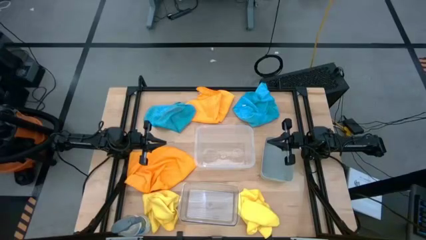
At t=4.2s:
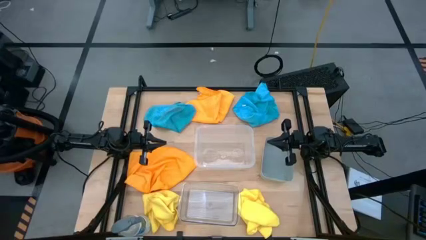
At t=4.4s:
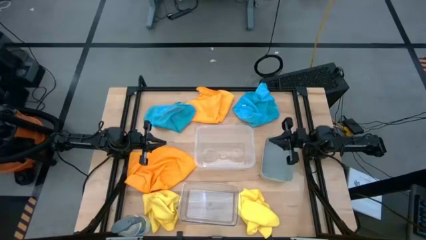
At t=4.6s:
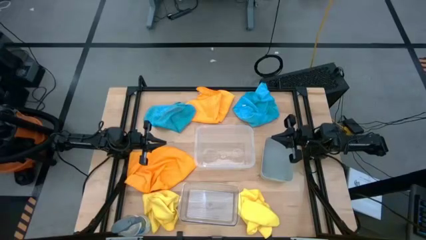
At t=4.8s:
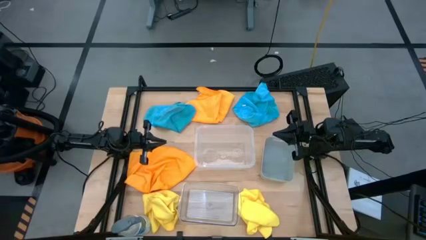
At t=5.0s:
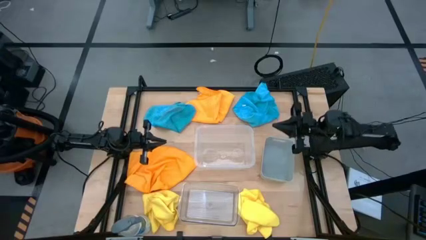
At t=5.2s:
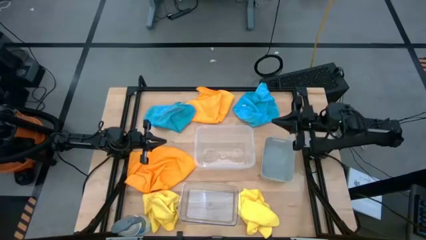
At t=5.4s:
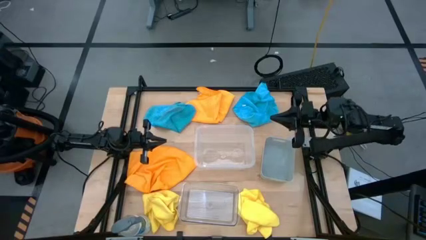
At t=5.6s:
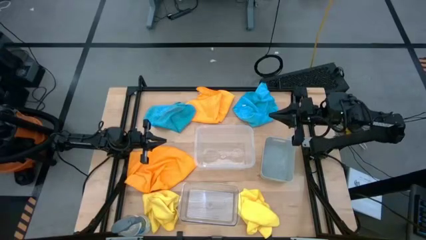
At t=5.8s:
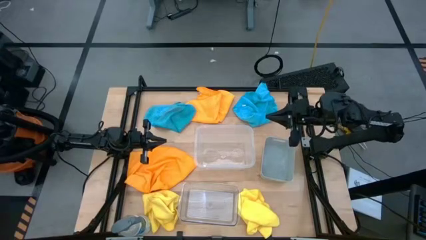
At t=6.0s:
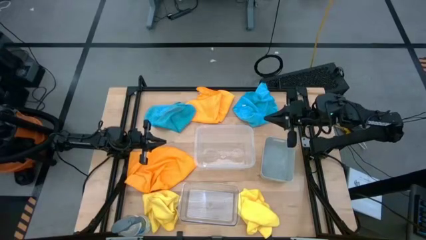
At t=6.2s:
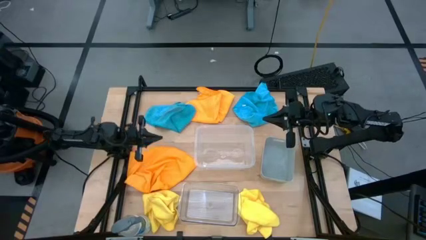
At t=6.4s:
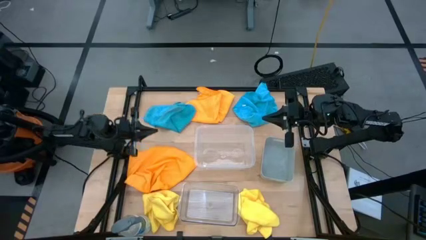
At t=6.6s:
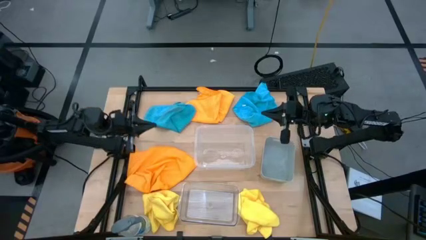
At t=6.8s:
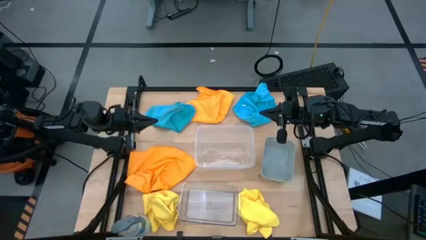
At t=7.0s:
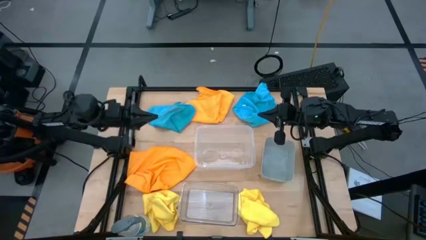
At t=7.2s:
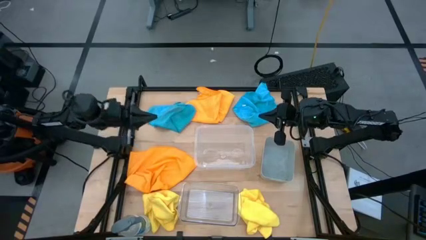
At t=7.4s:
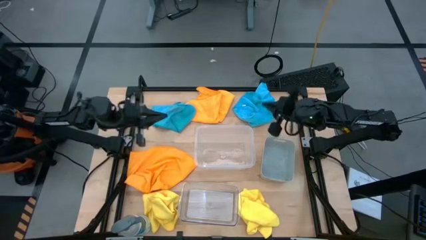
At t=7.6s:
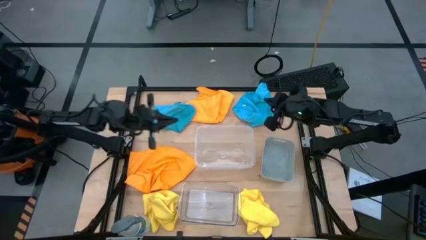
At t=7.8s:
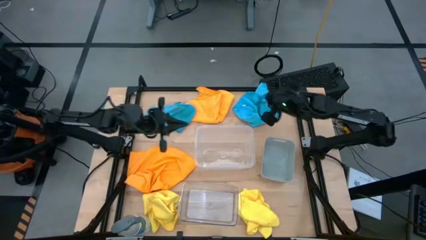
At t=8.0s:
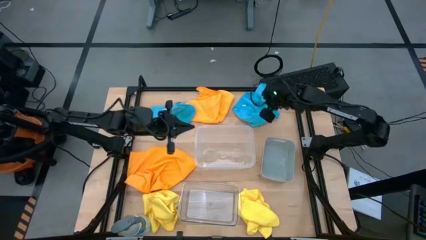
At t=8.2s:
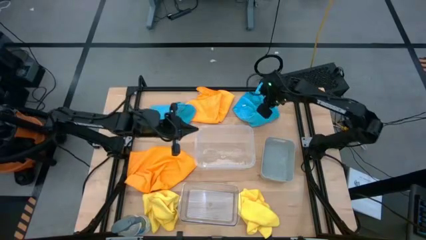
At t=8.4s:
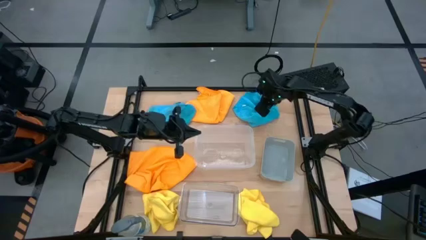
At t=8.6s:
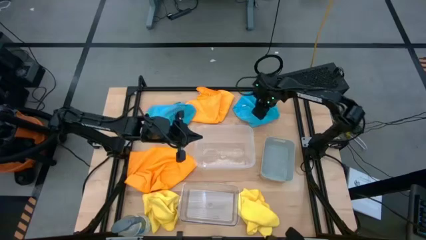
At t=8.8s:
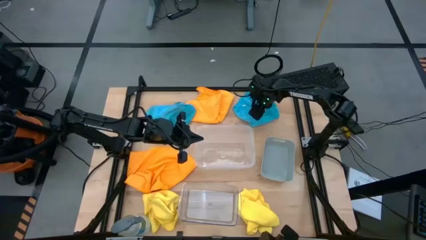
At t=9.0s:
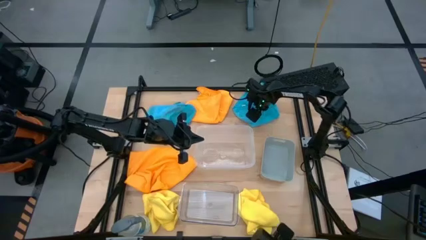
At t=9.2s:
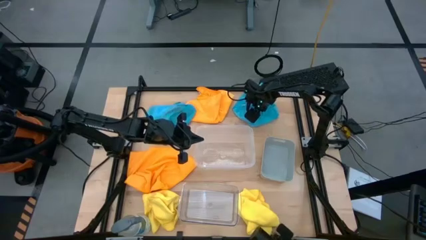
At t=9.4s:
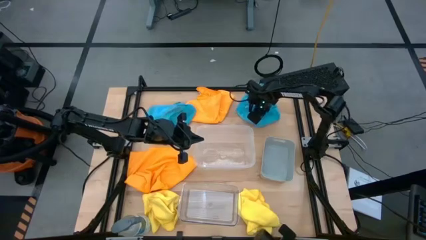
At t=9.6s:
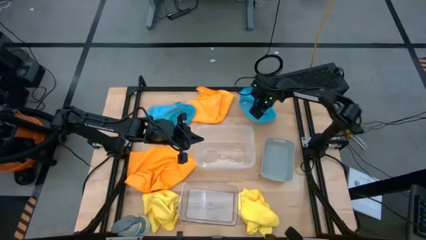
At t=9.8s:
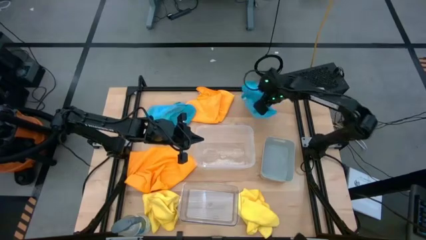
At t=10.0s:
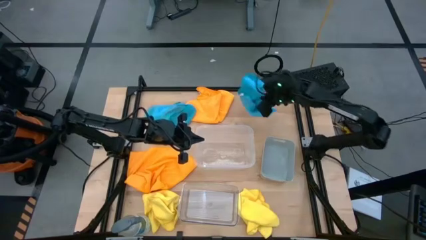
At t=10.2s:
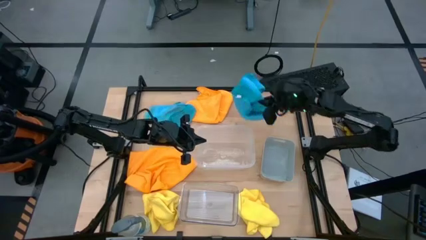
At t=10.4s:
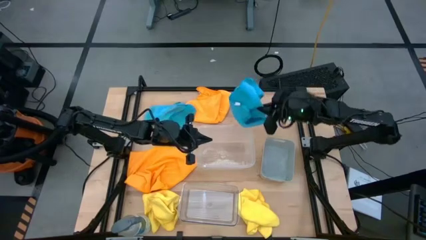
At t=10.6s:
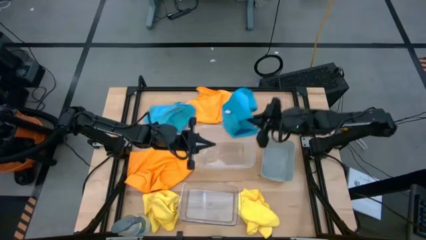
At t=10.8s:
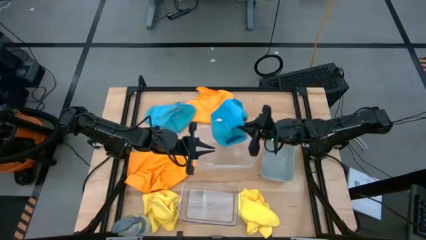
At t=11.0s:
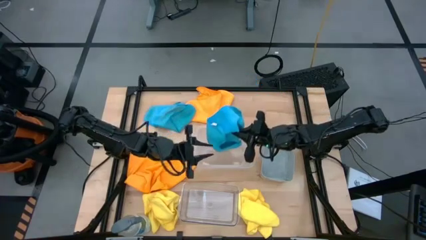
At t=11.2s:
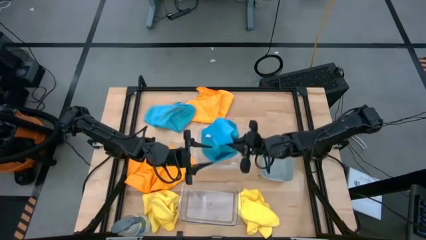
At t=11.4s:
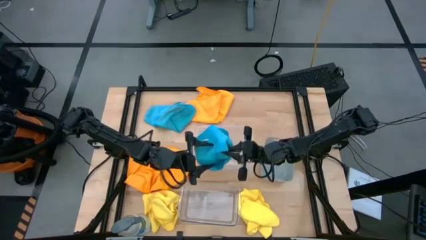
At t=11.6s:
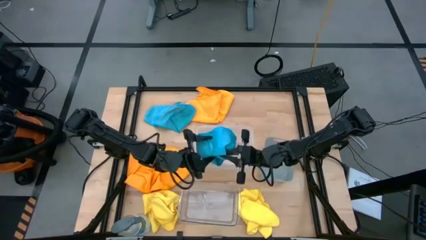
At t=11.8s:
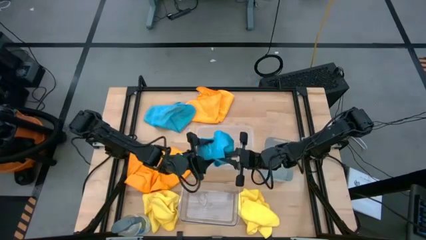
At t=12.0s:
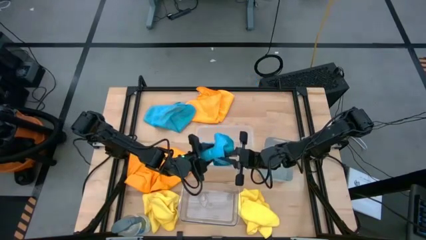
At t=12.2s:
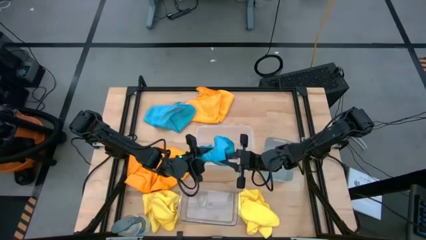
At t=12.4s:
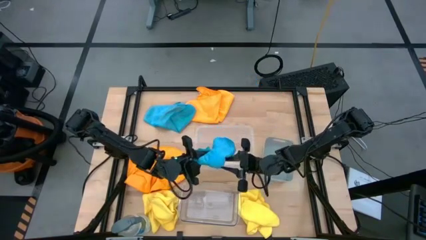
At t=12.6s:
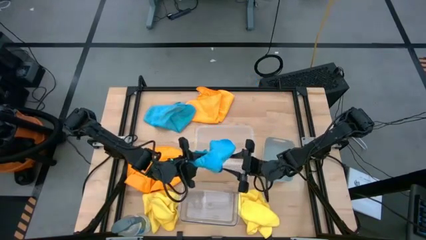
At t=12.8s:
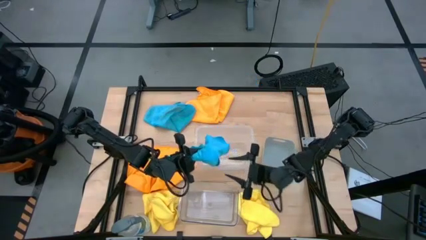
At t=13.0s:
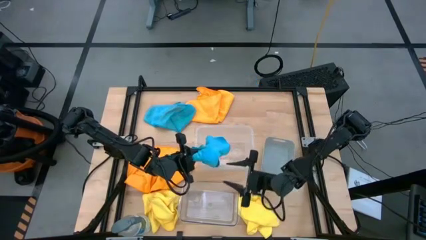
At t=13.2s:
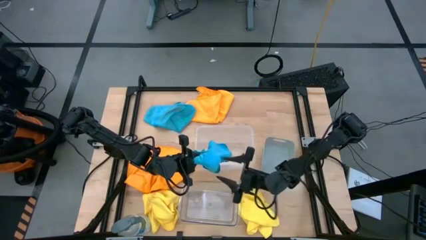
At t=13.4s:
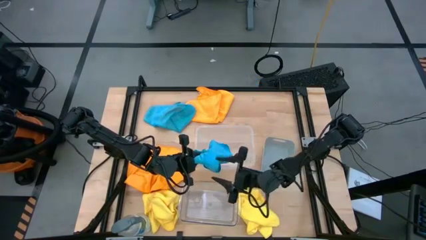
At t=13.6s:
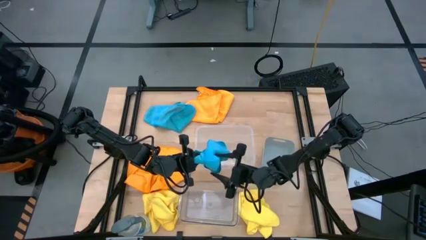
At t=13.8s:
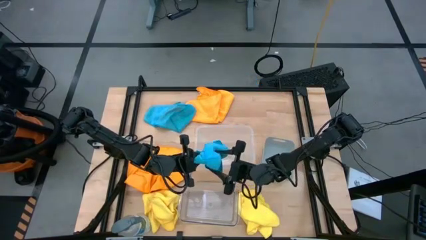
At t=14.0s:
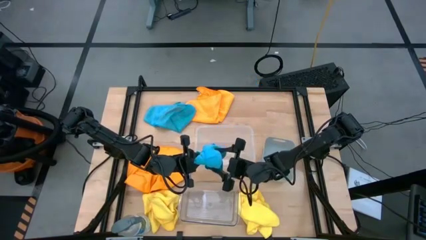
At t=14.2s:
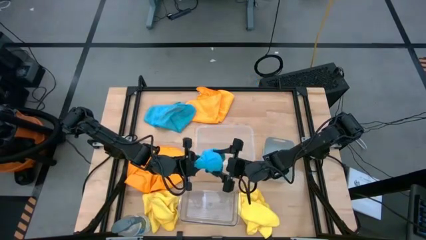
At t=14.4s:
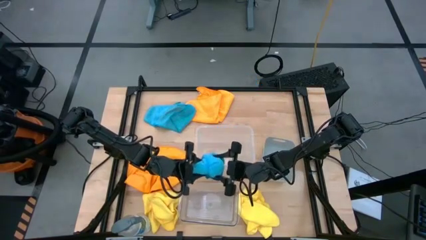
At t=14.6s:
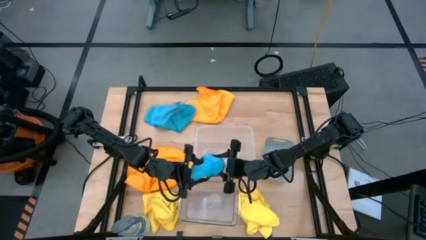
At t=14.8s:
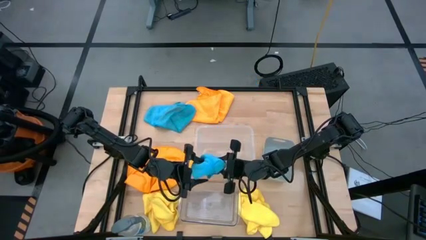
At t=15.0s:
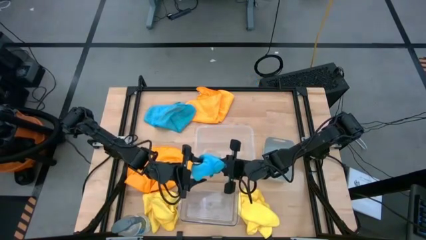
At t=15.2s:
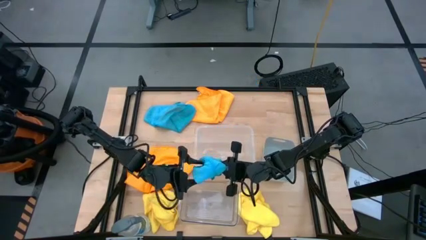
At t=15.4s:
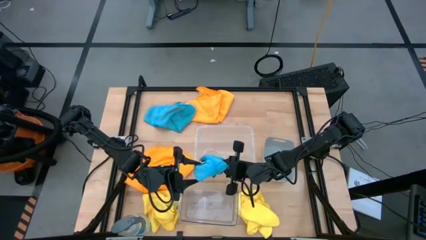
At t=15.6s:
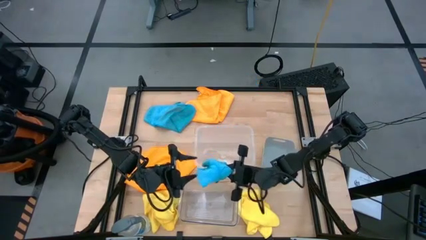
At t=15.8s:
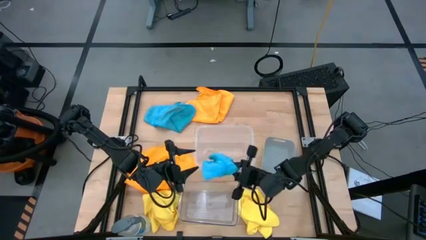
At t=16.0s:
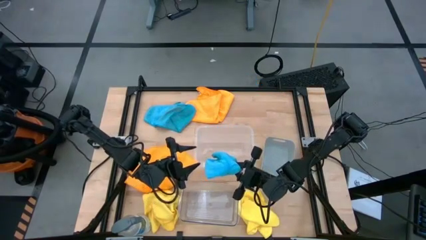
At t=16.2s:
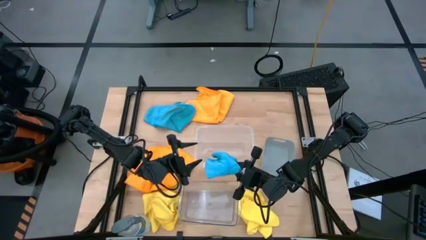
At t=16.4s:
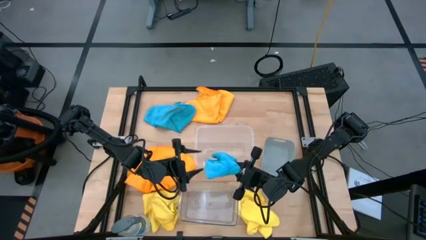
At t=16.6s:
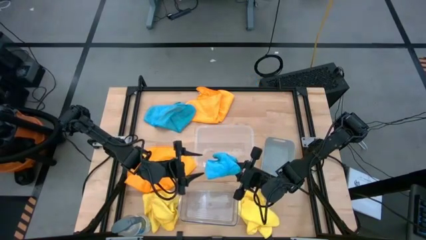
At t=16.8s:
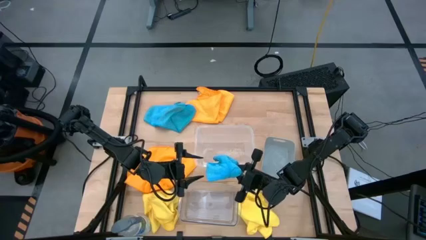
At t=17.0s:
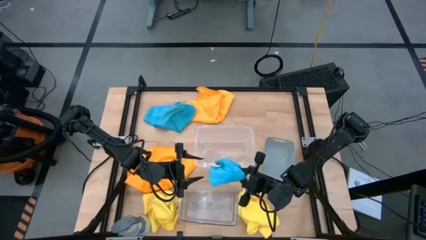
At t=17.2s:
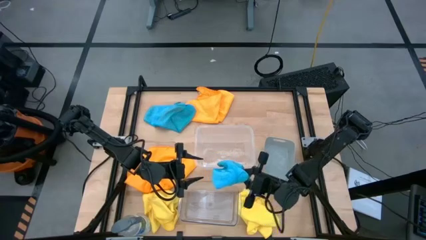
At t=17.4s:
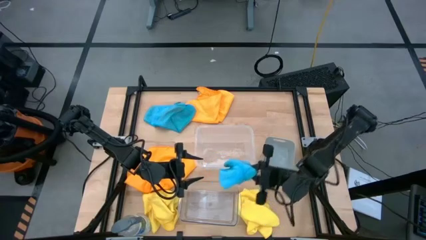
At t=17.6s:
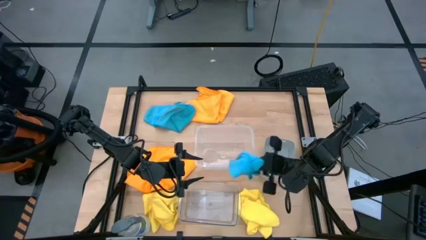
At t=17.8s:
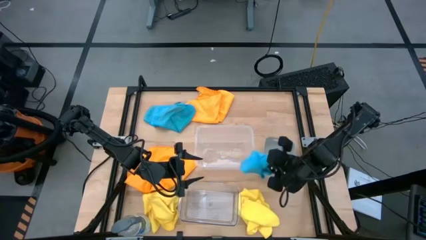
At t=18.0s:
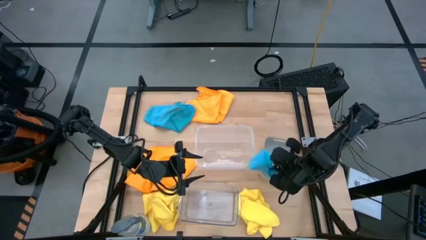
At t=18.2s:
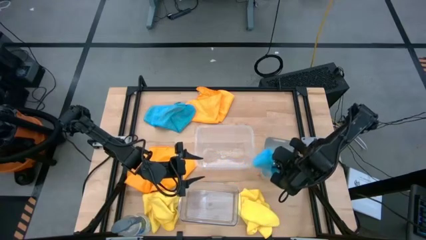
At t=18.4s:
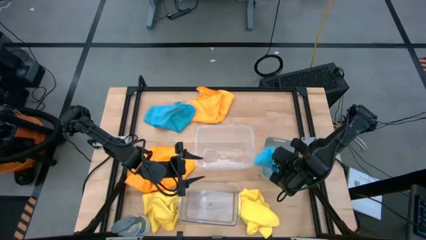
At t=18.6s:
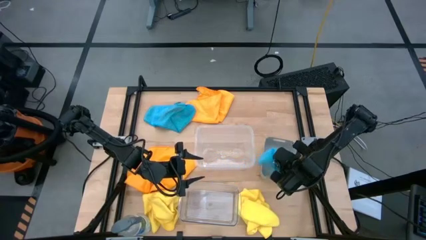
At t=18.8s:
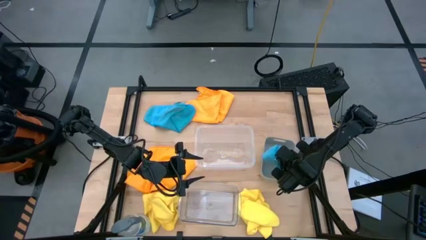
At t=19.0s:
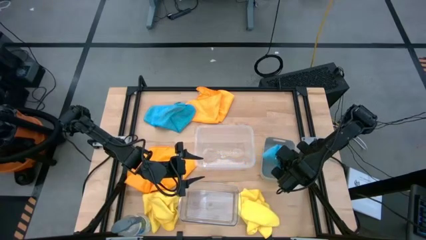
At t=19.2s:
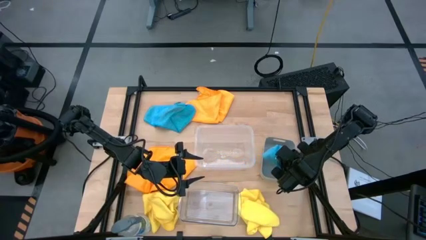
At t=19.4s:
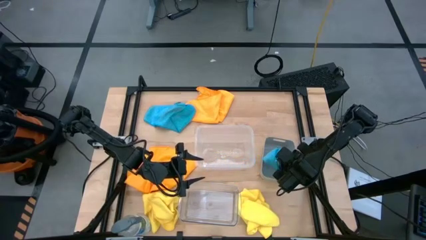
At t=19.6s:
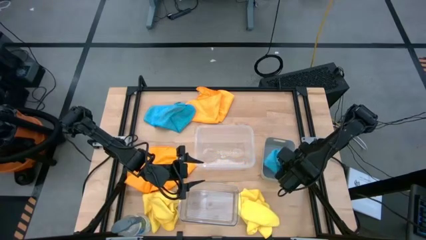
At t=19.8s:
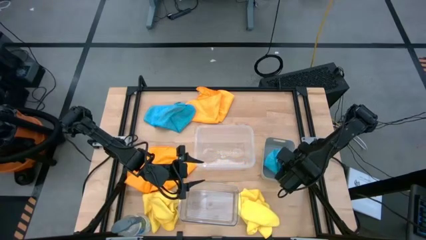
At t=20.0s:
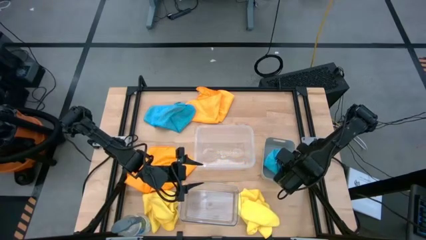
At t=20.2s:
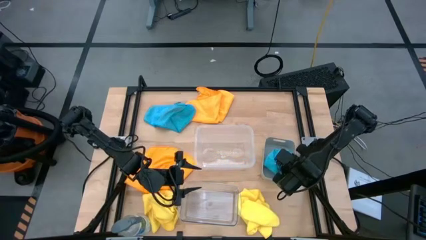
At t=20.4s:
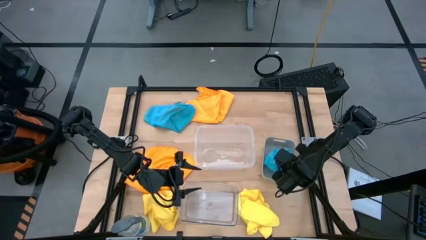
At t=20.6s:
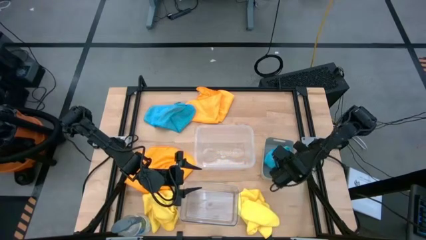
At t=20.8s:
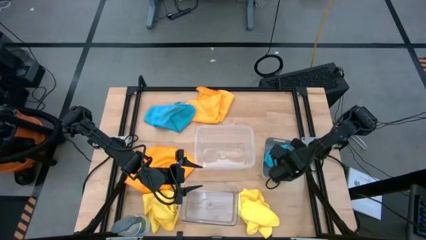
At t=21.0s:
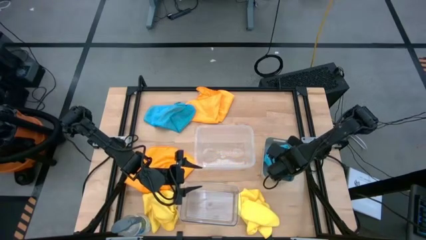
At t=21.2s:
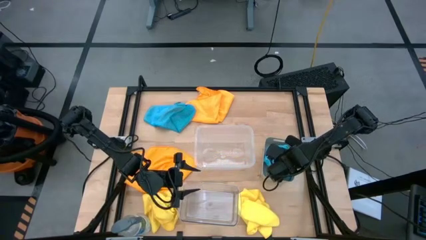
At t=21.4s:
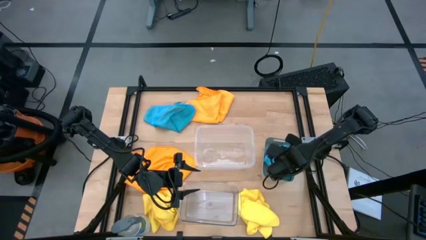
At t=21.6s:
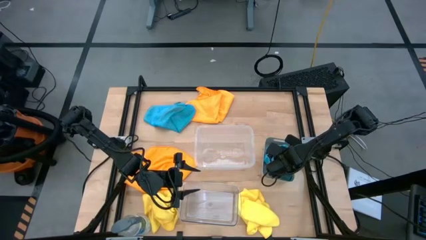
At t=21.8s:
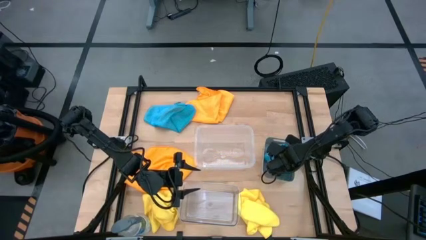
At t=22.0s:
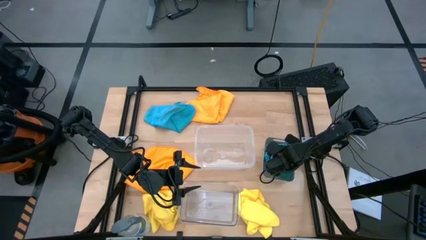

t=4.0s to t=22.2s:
Task: Sort microfiber towel by color & place in baskets
Put the right blue microfiber cloth into the gray bin
